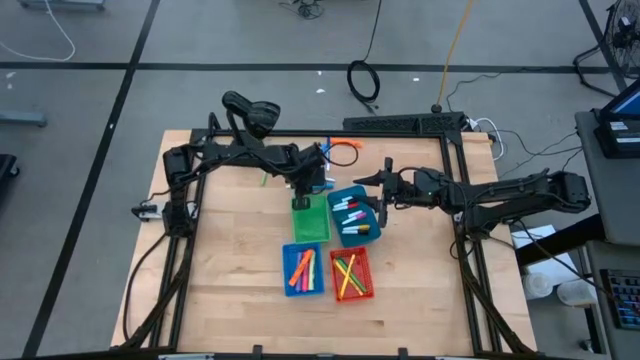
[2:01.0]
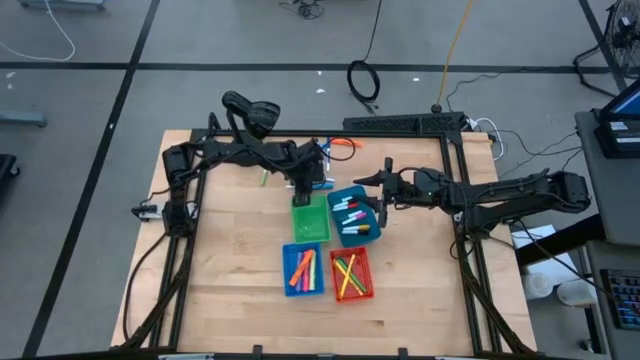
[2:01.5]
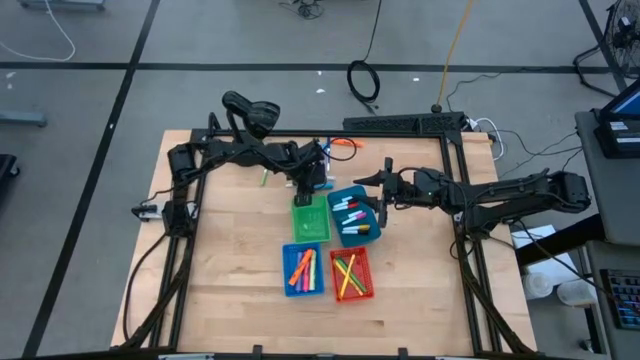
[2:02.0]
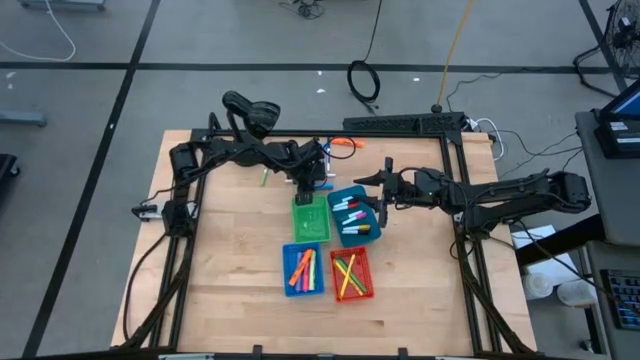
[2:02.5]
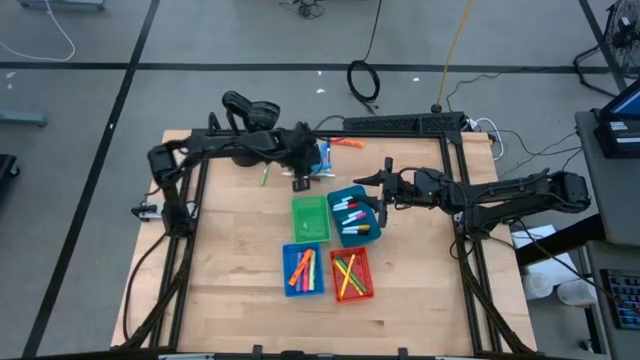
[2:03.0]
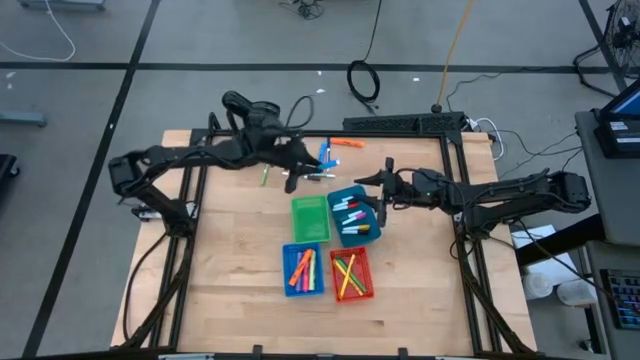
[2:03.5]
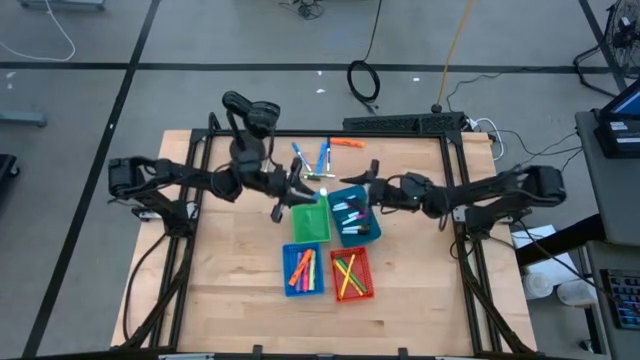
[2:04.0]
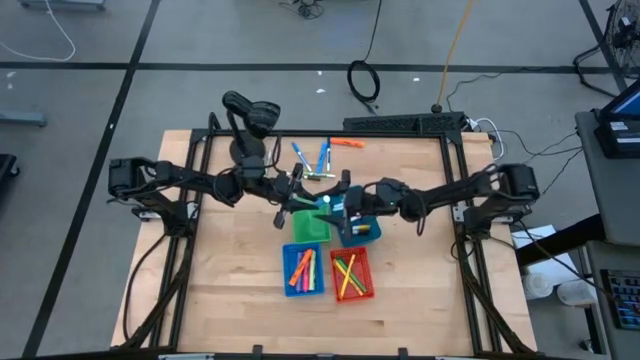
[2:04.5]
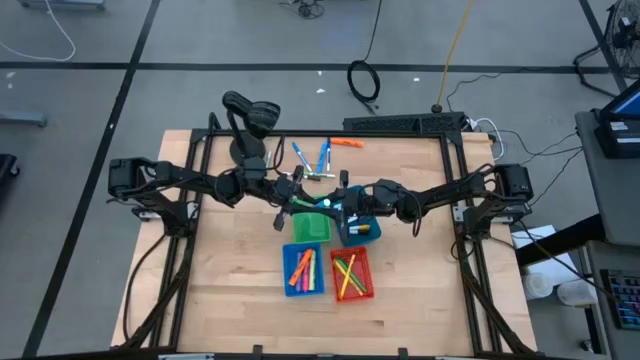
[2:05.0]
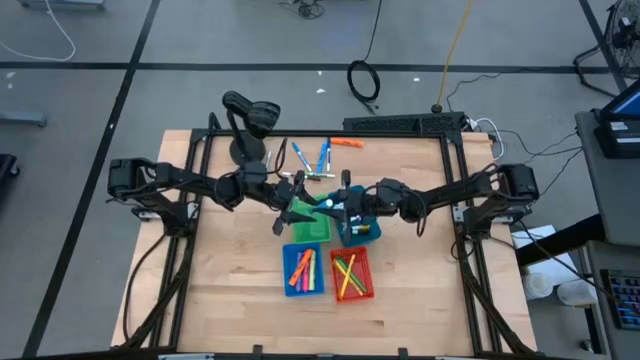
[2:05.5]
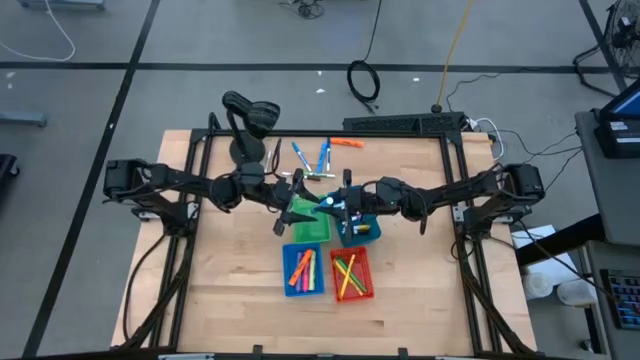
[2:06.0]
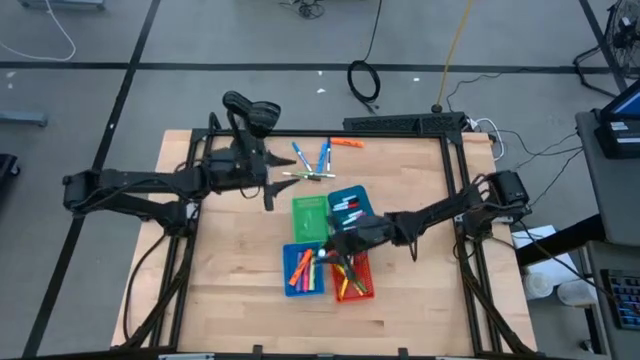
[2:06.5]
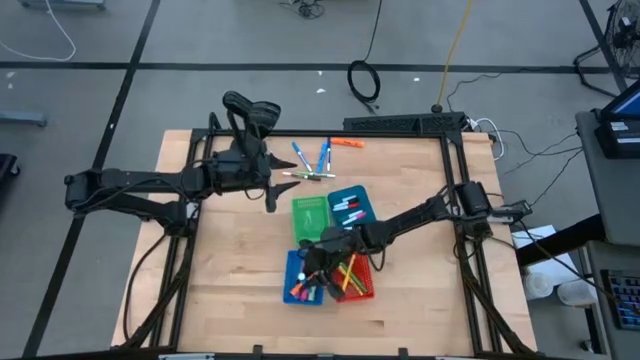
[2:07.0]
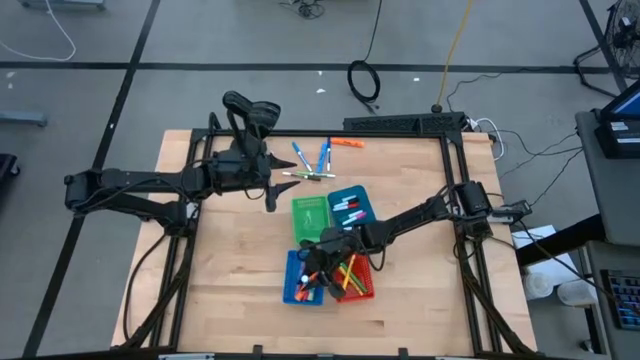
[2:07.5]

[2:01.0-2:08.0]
Task: Pick & Place Markers
Put the blue highlighter pen into the blue bin

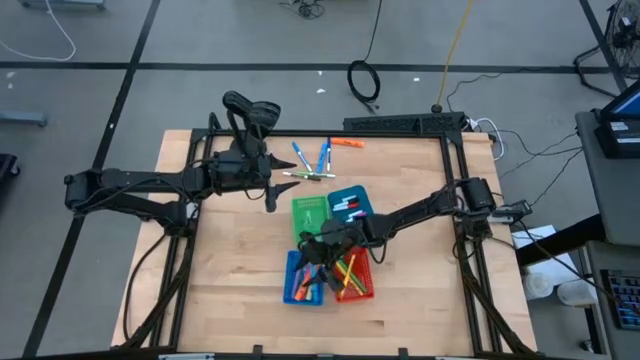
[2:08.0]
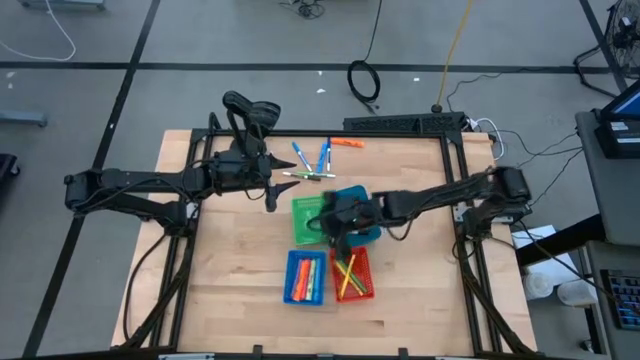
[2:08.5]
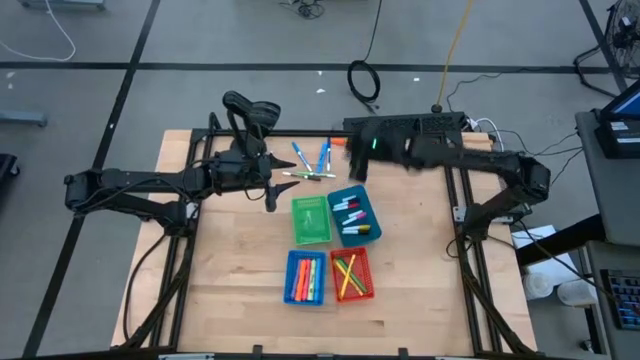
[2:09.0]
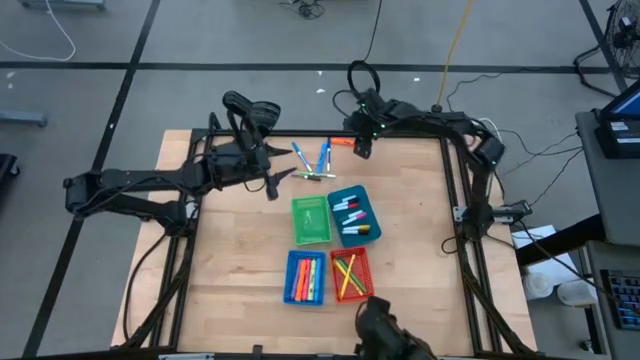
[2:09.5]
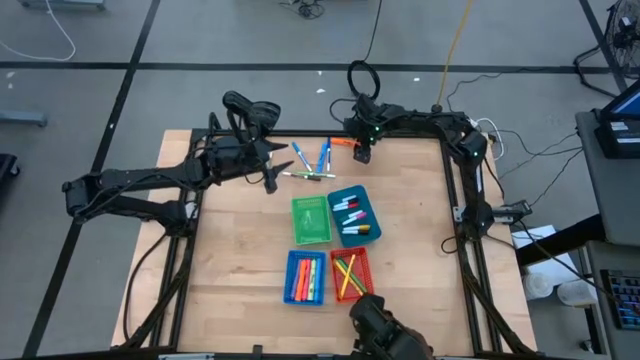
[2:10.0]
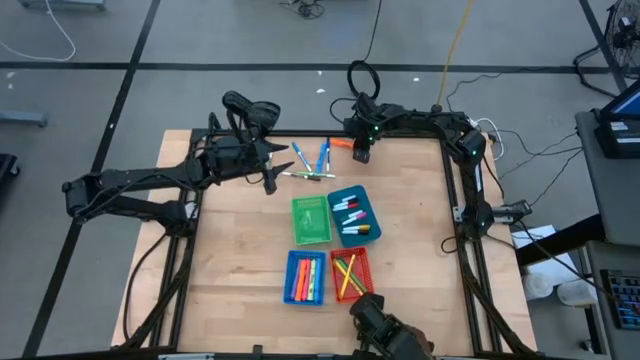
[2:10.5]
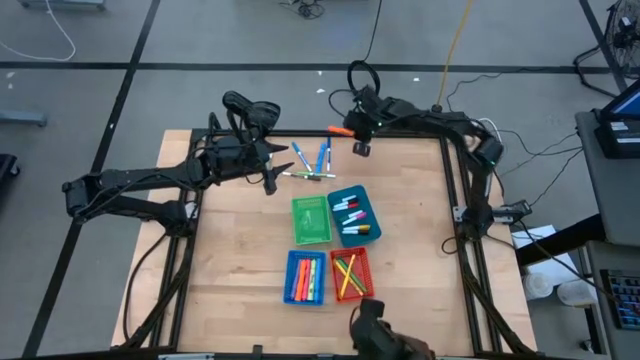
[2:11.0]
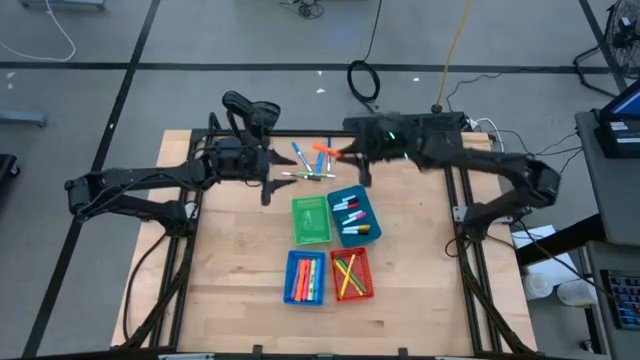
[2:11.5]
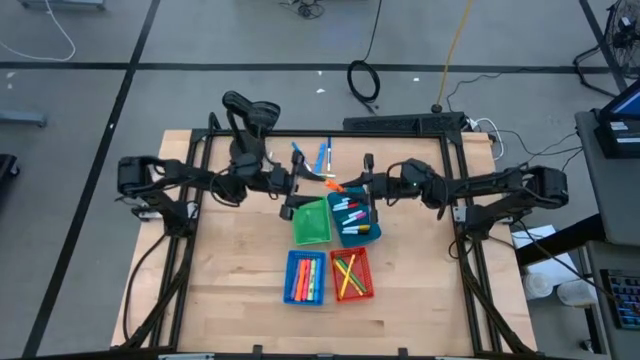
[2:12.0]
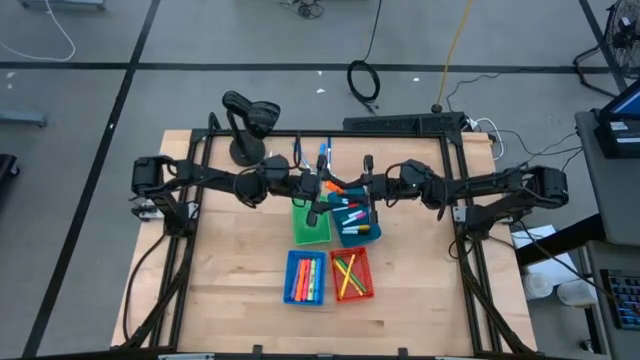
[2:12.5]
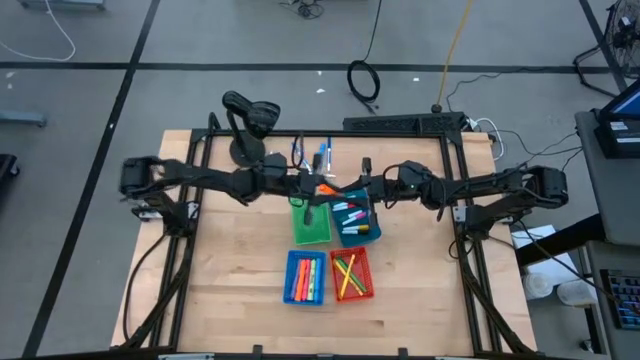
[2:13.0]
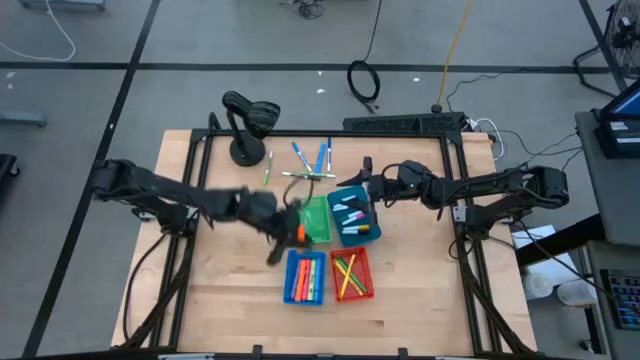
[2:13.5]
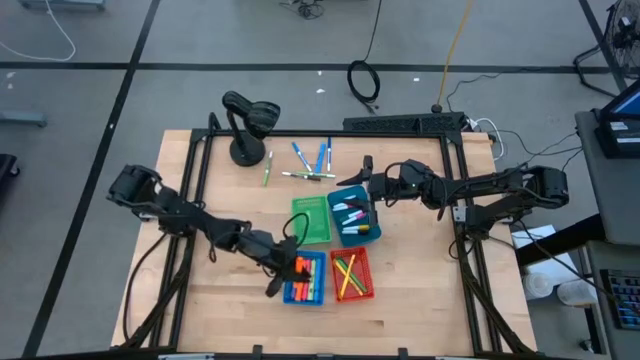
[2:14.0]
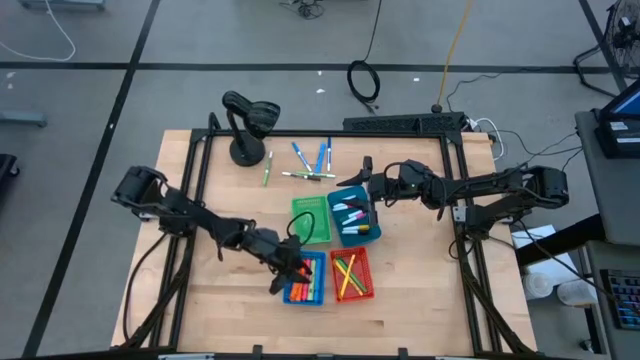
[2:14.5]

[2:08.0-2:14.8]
Put the orange highlighter pen into the blue bin

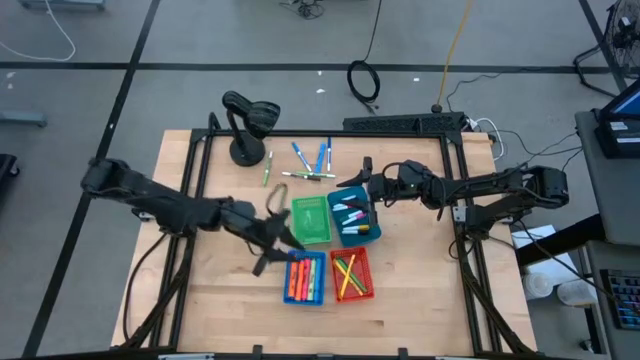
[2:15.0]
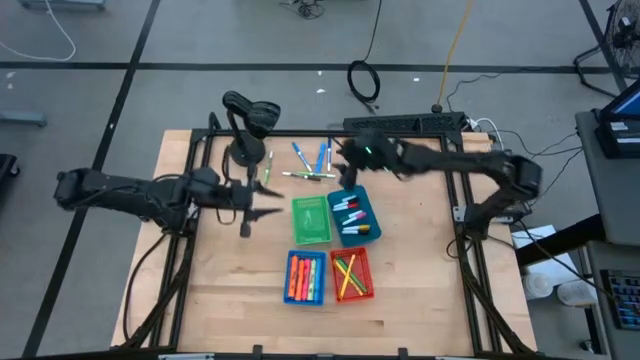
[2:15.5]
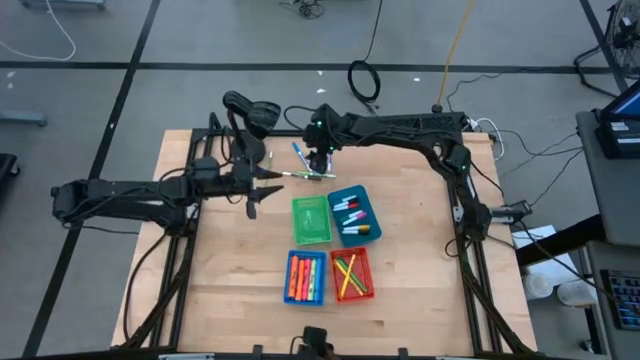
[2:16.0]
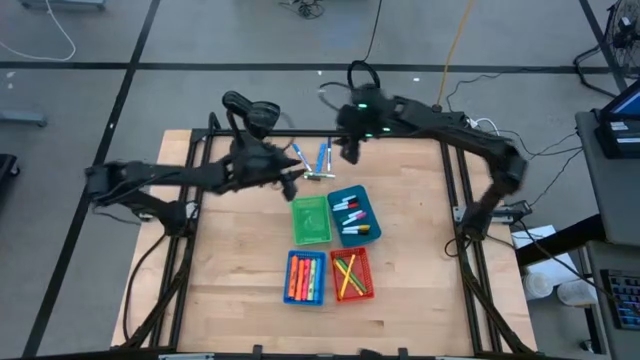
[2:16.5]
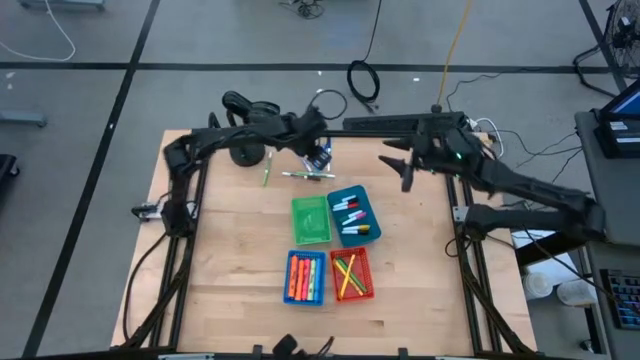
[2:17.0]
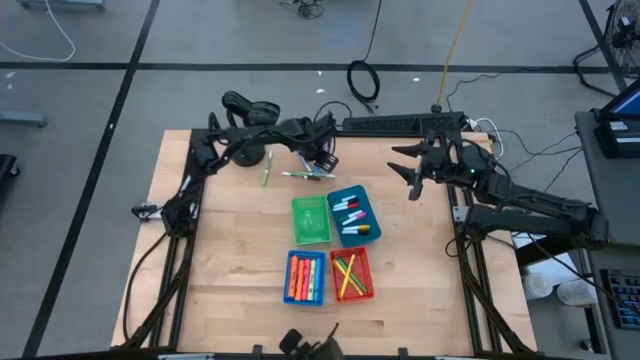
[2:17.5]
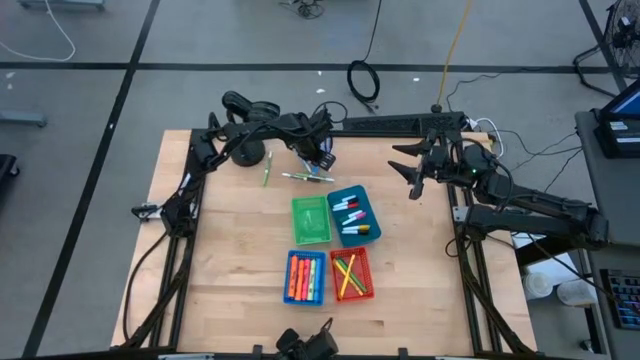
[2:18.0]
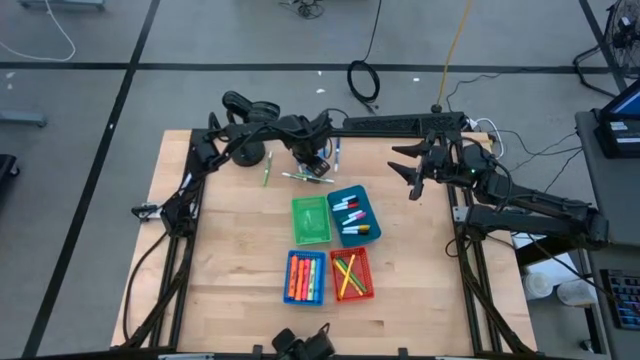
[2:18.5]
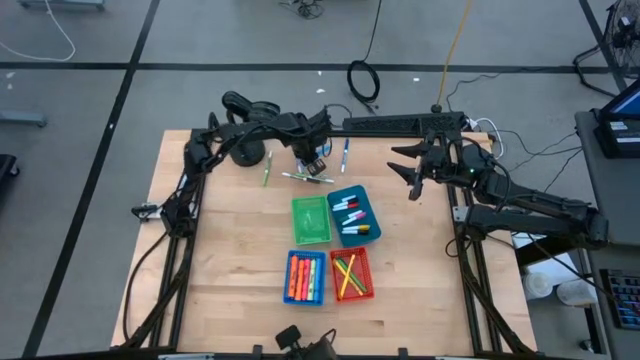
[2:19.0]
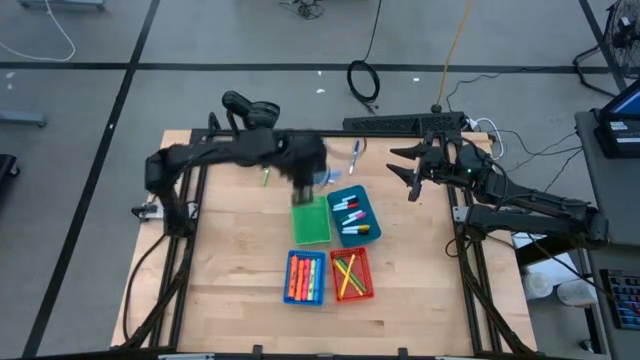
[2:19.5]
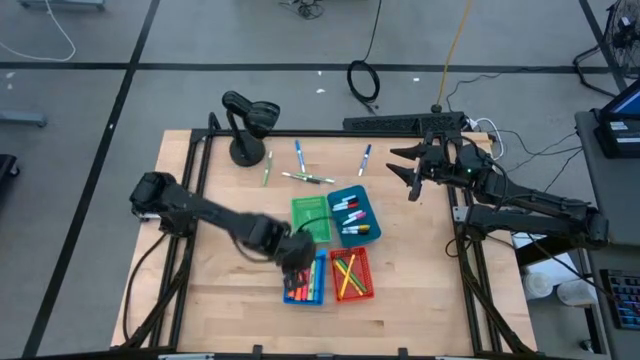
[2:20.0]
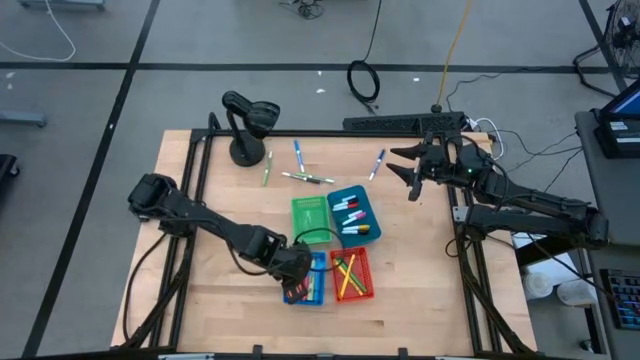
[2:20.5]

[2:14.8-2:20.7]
Put the blue highlighter pen into the blue bin

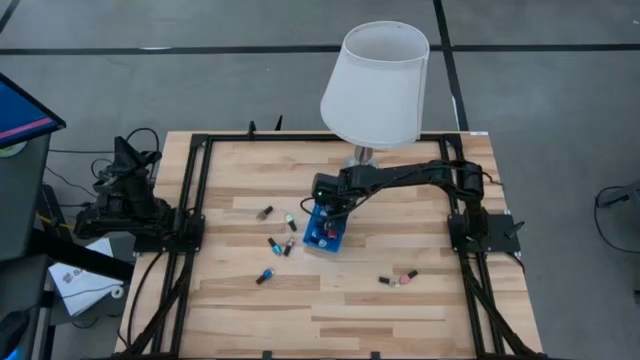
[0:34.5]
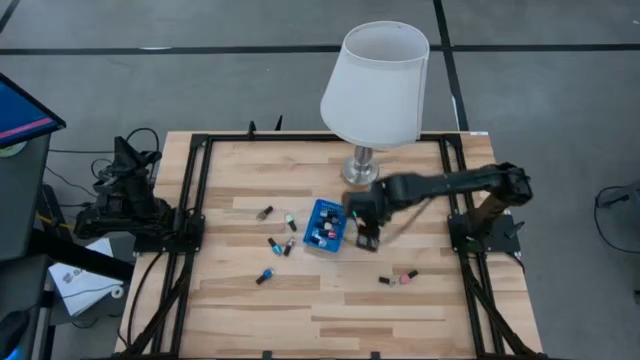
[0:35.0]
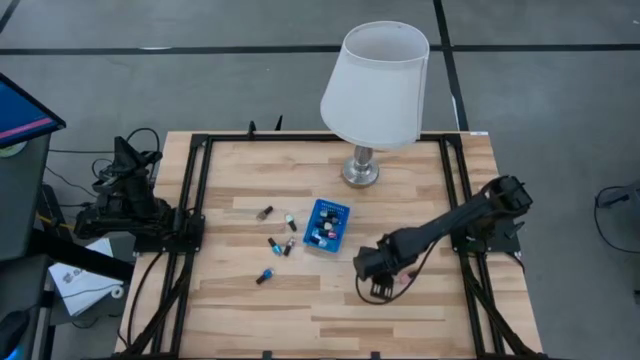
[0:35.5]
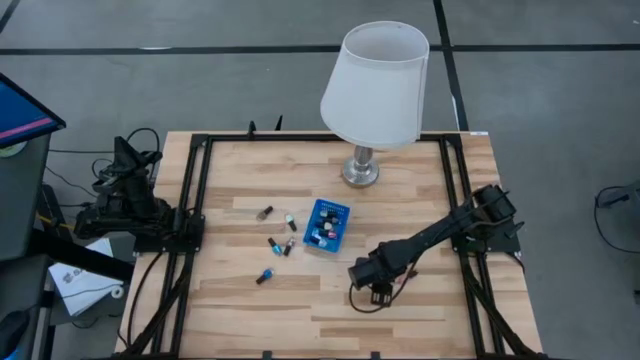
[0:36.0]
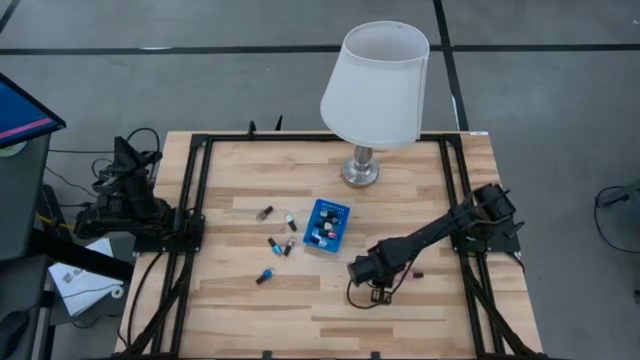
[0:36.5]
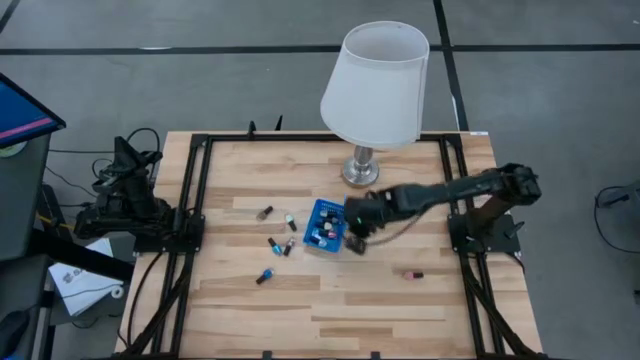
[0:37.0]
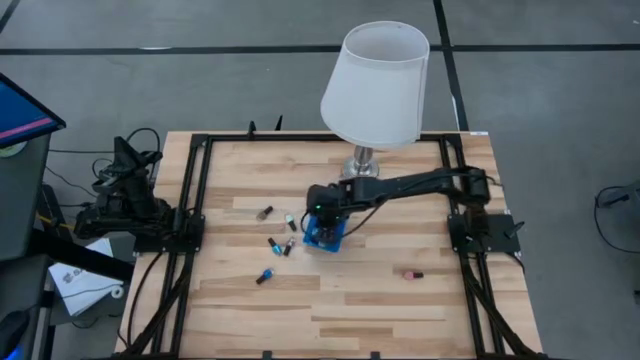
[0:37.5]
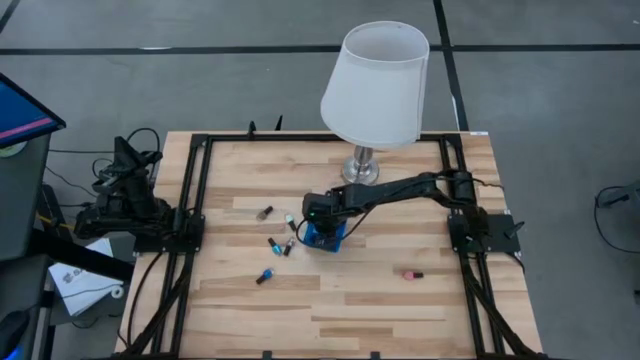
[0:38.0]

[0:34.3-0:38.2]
Task: Pick & Place Nail Polish
Put the right clear nail polish into the blue basket
